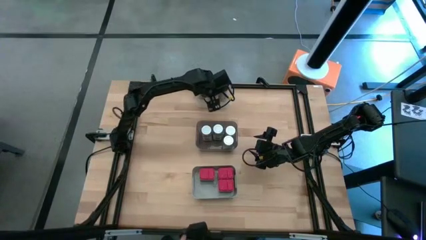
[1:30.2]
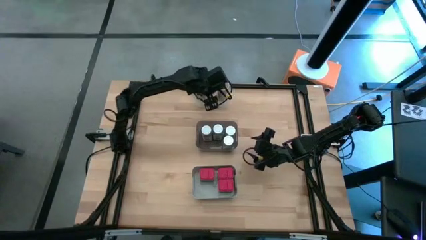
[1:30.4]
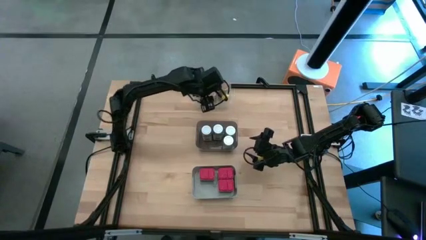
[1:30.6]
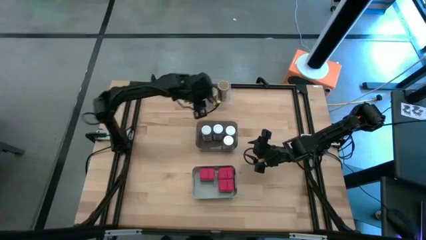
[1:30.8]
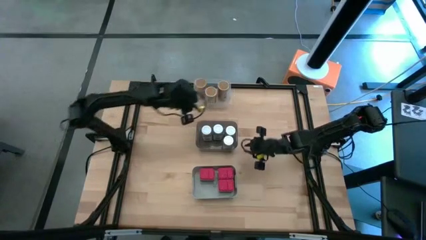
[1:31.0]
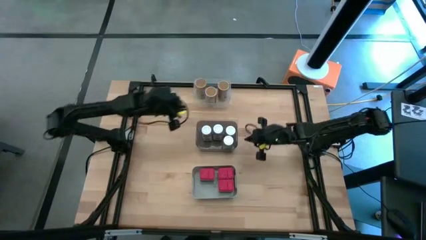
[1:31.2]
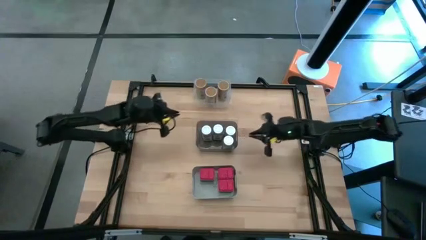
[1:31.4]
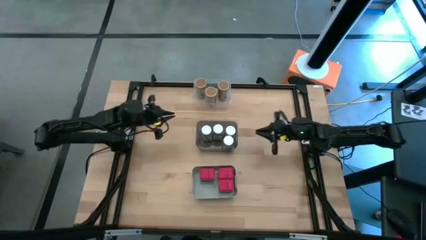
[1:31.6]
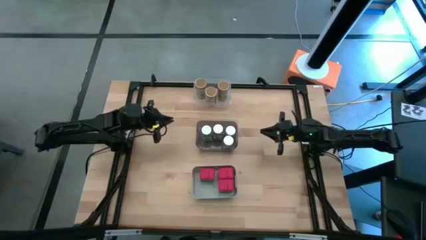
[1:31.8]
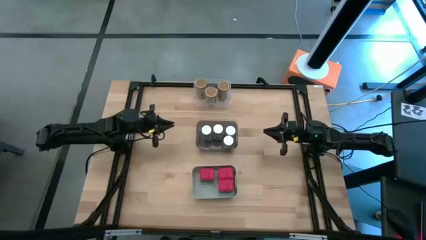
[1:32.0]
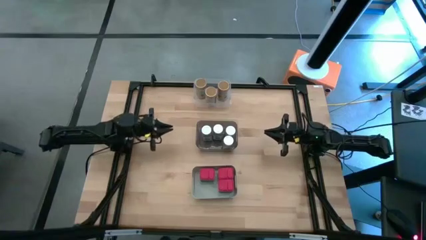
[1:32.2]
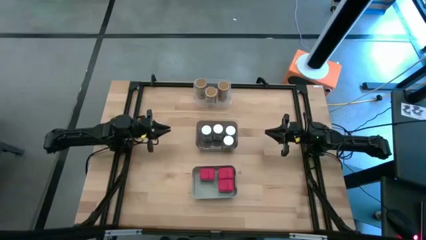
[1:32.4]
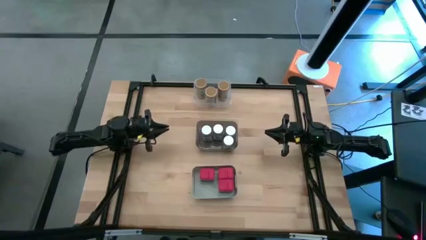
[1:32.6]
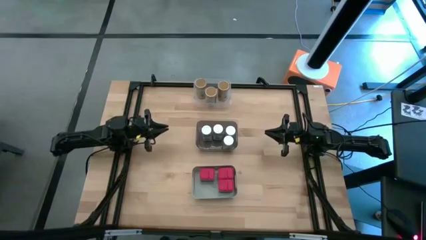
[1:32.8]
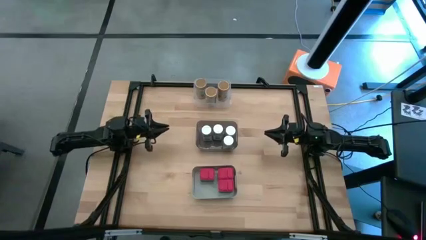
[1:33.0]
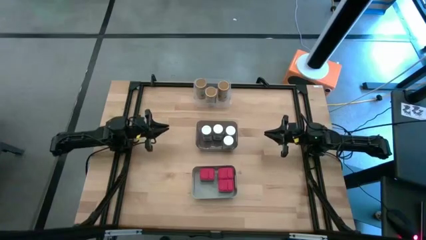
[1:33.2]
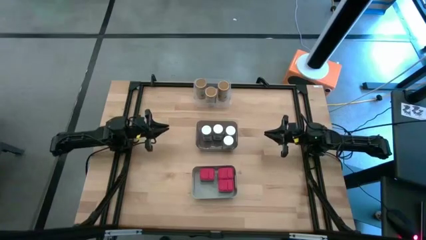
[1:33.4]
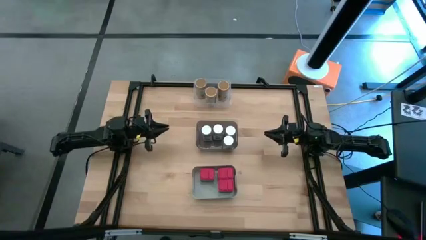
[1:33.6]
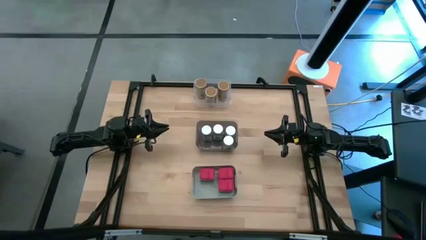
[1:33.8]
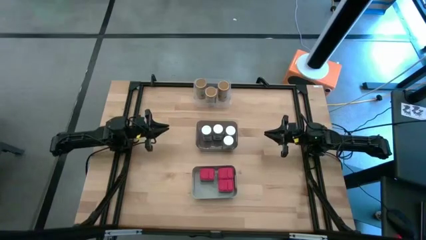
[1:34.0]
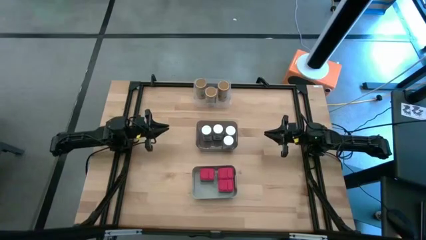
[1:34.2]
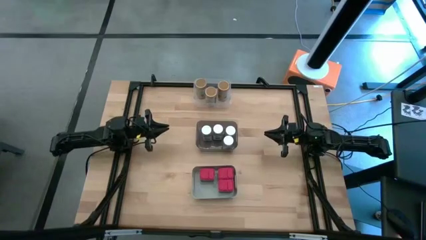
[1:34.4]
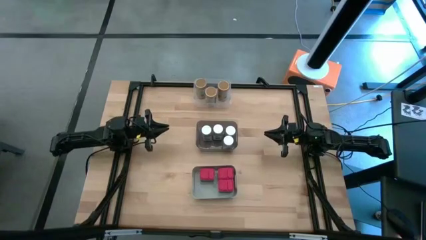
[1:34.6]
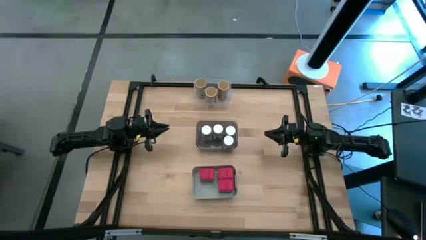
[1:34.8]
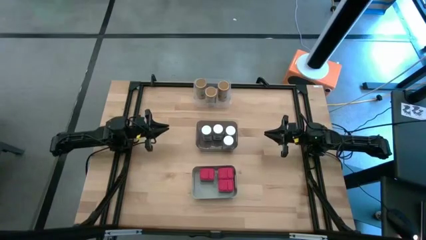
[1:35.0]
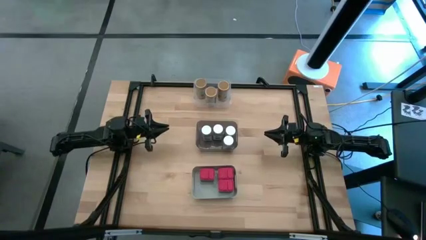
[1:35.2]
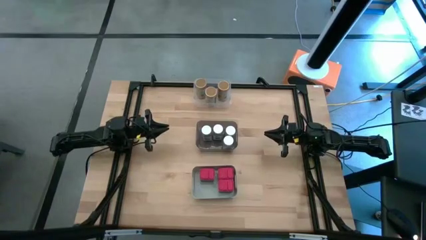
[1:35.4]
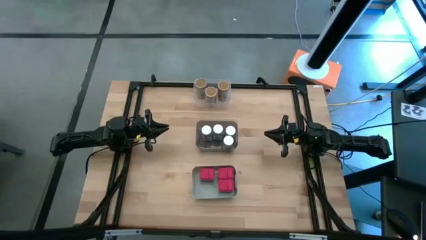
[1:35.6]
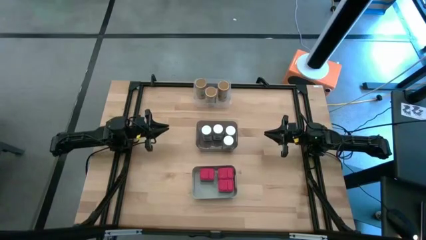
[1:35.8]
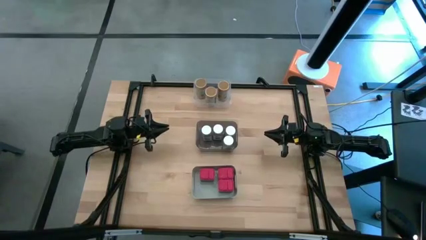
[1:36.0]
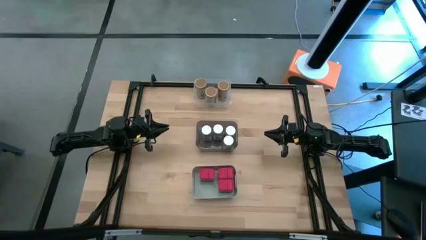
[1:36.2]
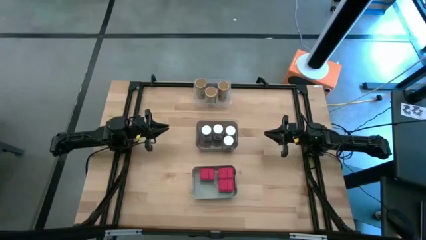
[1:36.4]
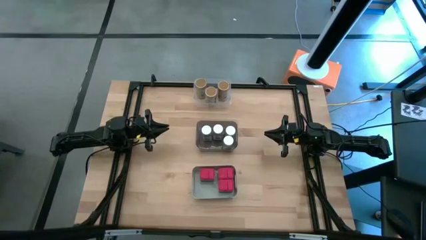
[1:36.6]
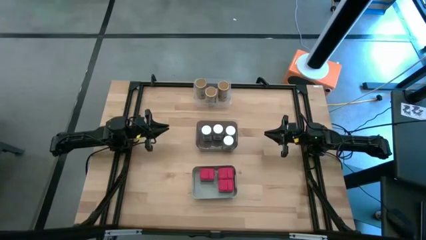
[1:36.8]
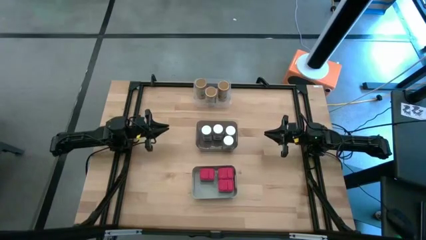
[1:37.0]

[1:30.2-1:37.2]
Task: Sort spices by type
Return to Home Position

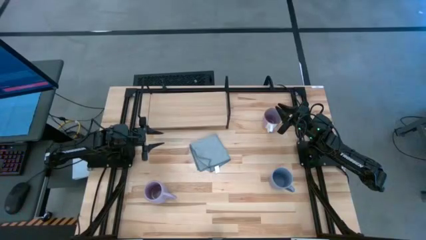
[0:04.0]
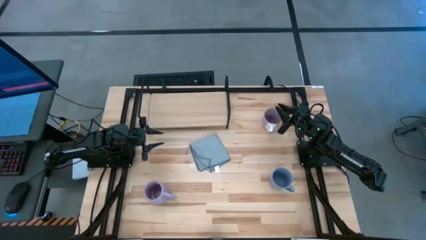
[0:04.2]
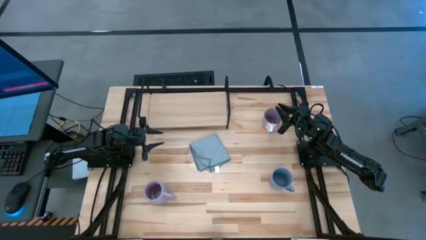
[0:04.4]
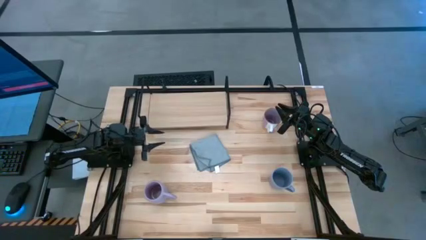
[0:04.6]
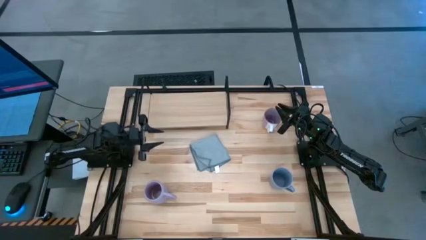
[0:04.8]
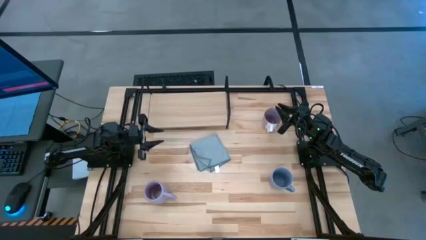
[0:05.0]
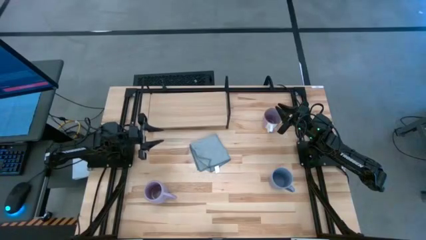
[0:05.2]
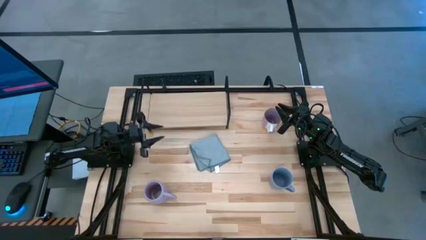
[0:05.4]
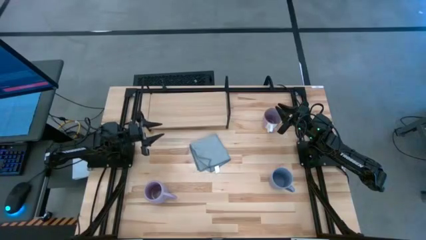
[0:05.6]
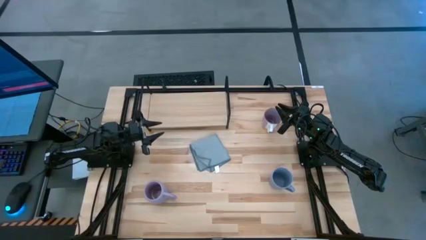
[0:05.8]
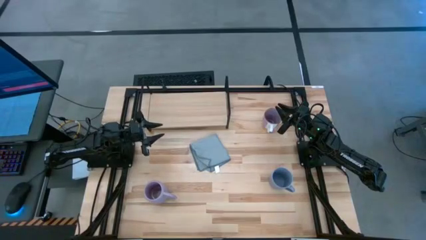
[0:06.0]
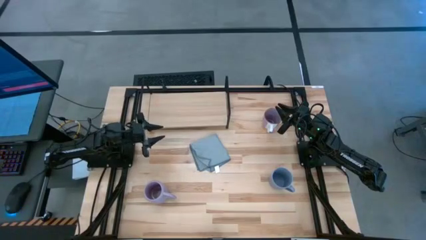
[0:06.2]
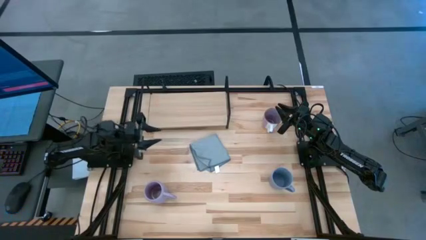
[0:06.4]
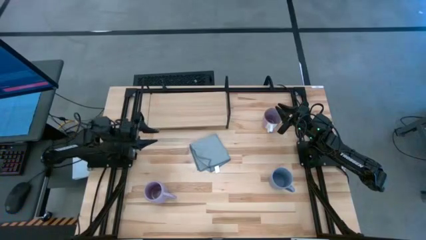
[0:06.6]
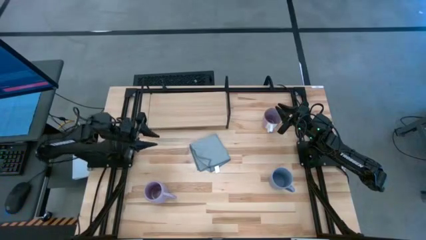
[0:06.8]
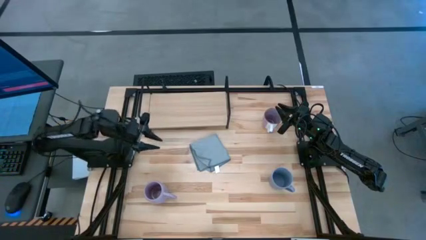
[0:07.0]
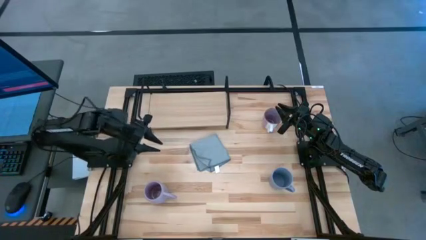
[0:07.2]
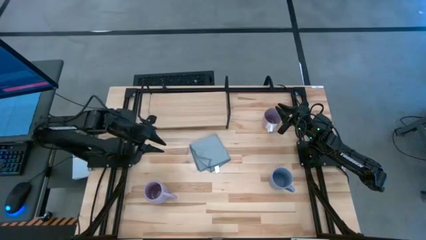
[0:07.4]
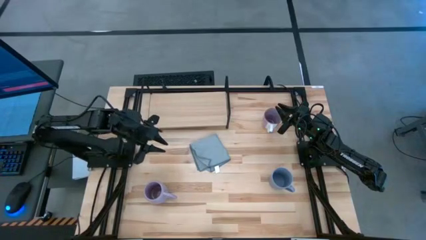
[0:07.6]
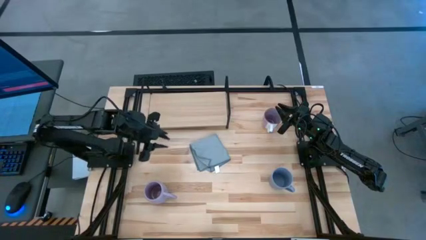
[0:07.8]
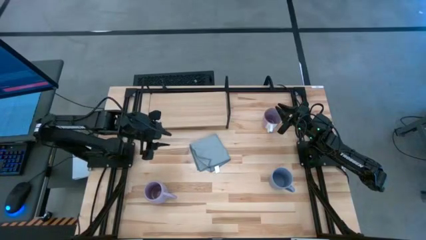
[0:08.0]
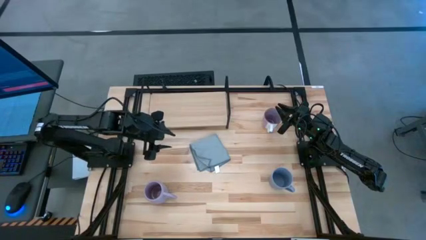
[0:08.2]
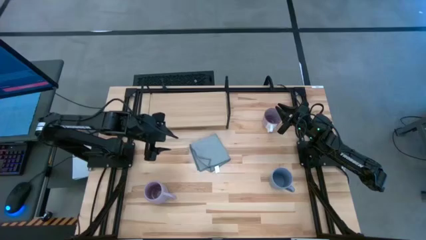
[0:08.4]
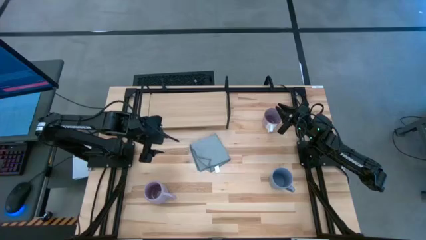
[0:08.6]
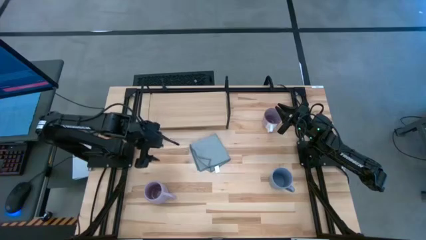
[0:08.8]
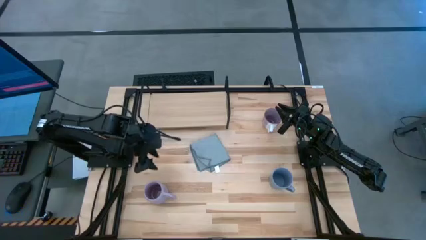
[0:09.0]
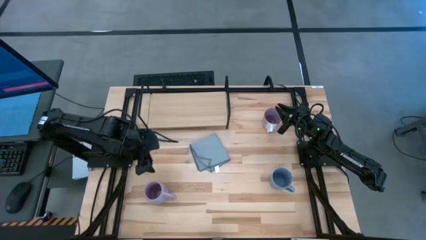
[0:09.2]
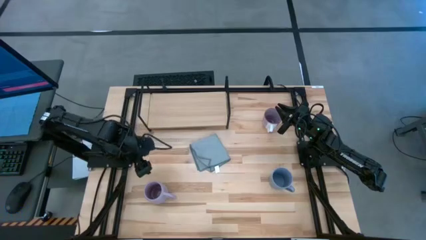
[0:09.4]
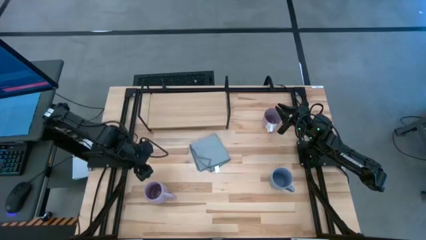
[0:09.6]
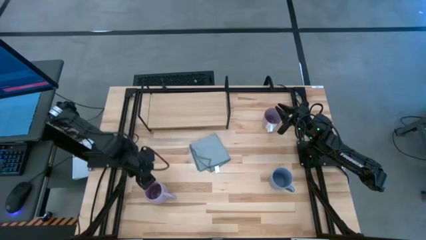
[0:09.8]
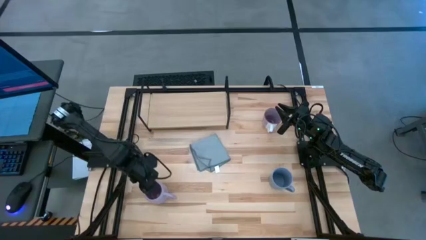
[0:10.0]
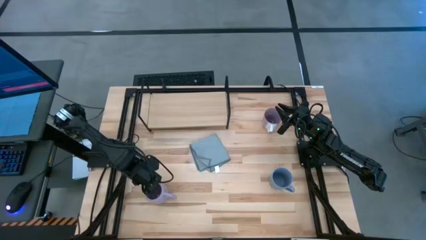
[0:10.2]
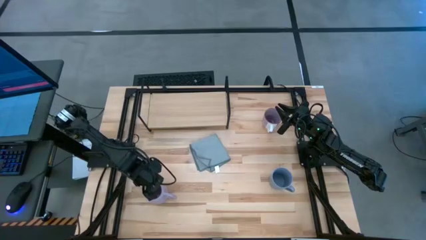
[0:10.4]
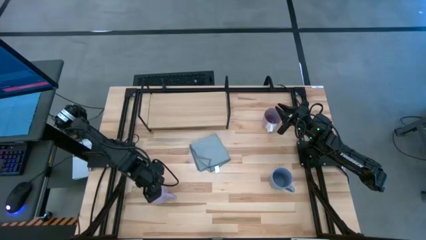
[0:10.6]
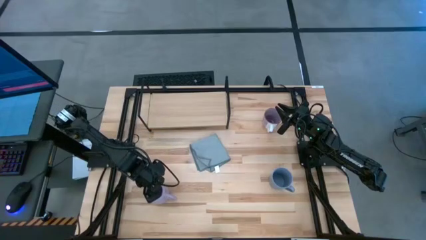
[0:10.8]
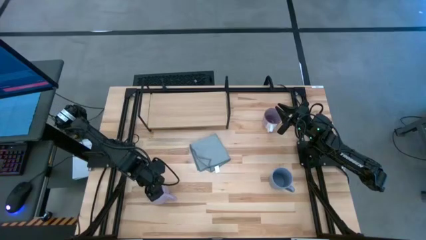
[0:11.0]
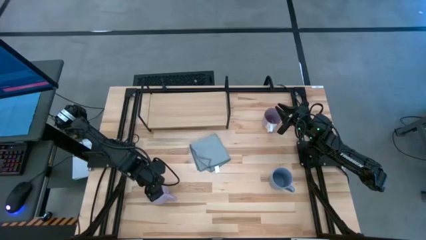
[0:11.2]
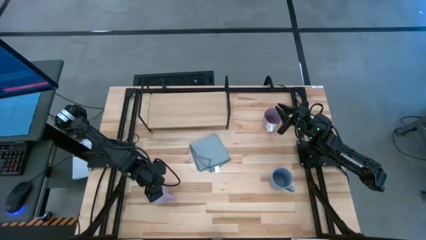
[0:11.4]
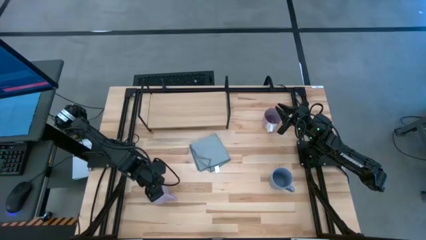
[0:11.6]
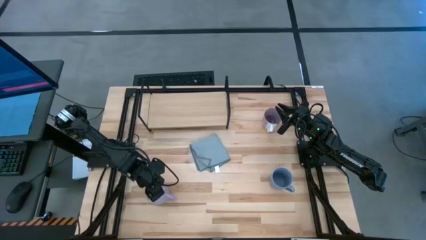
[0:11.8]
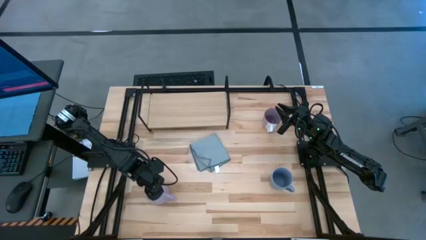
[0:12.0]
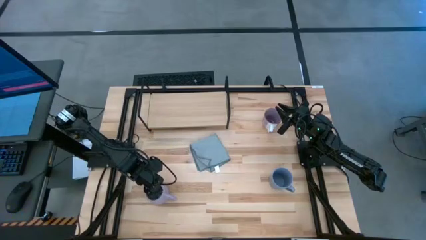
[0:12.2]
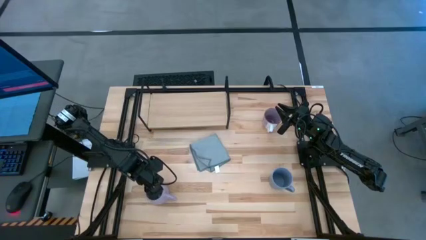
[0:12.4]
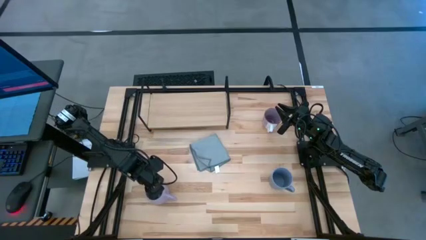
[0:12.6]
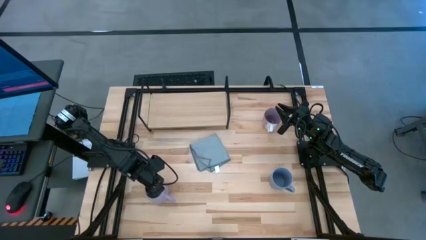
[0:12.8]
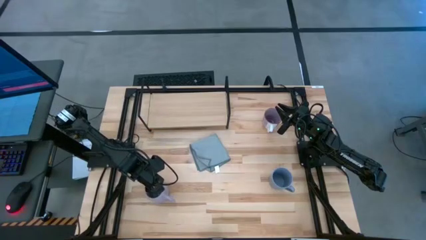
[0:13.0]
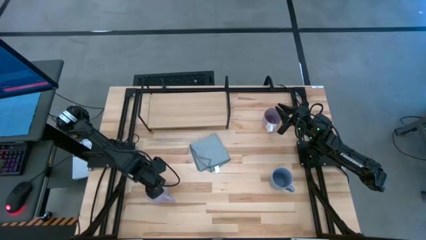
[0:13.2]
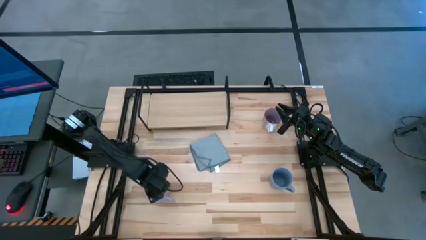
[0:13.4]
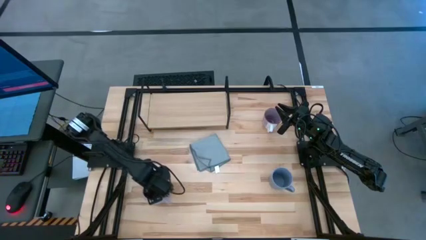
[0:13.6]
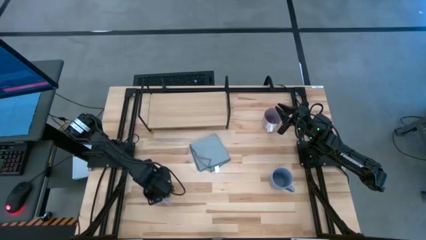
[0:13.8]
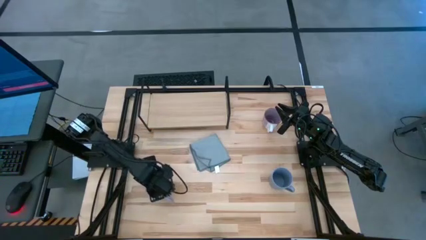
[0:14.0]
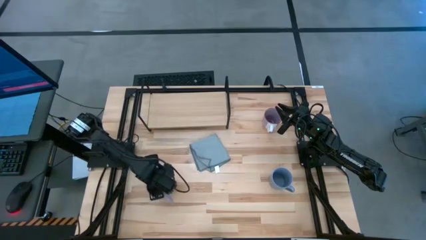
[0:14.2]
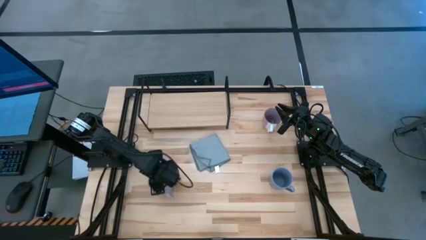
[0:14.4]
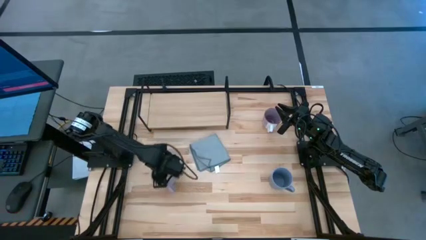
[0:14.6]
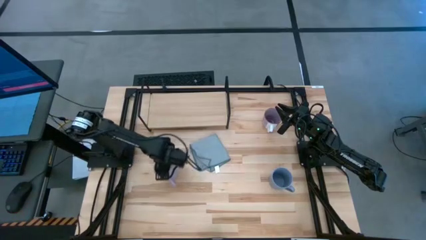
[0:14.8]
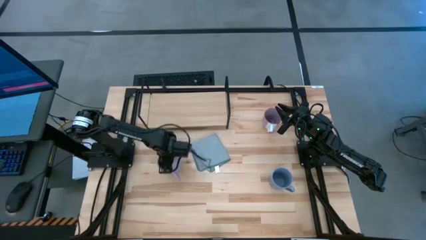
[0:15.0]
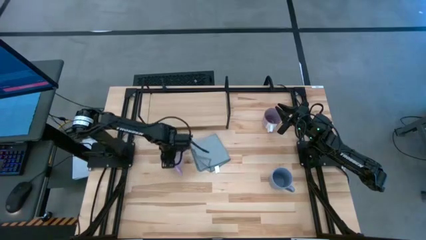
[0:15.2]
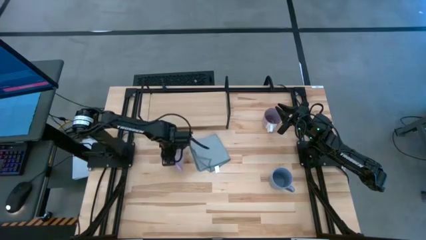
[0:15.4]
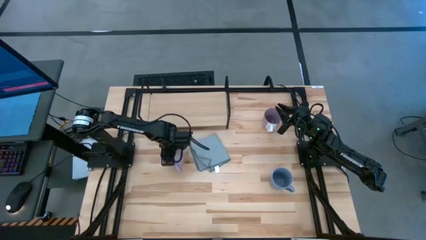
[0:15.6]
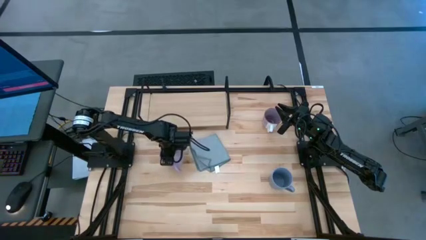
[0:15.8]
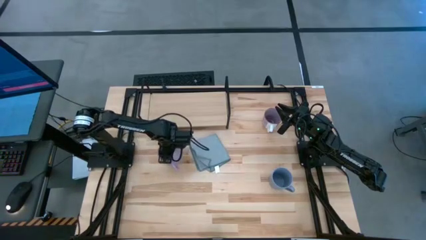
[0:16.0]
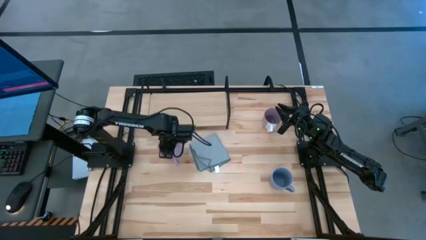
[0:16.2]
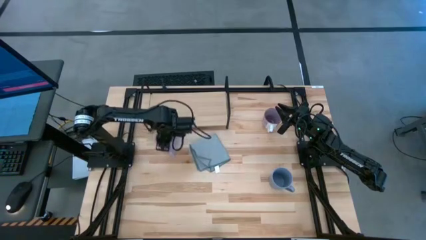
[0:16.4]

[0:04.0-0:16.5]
Task: Stack small to large cups/mugs on shelf
Put the violet mug on the shelf
